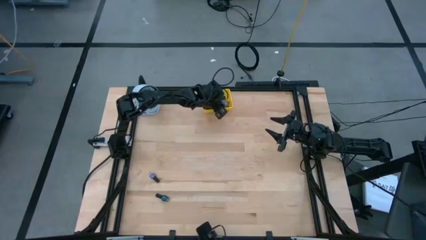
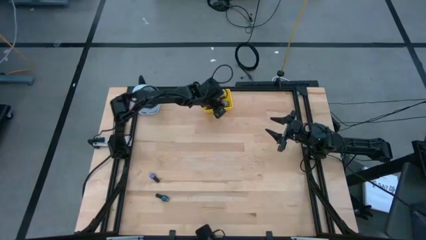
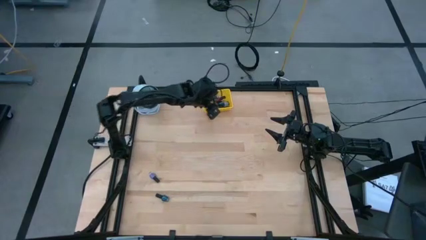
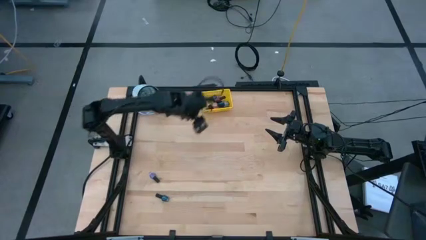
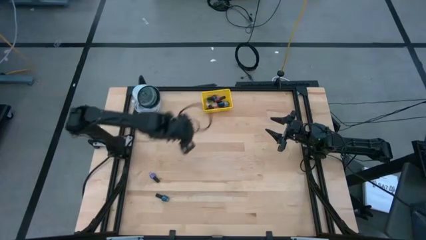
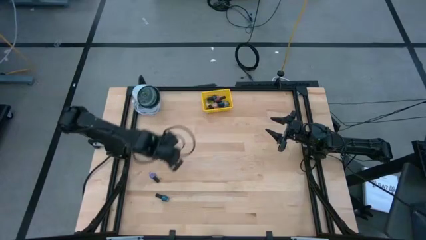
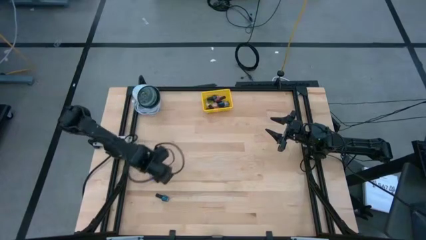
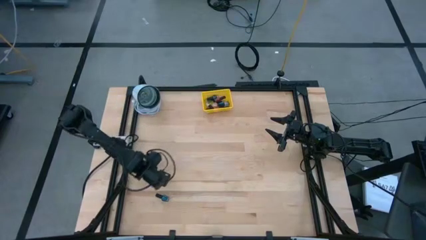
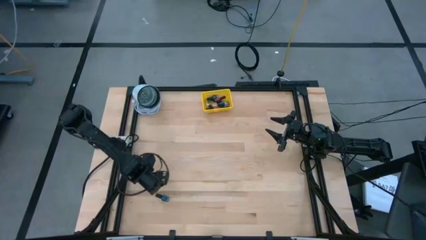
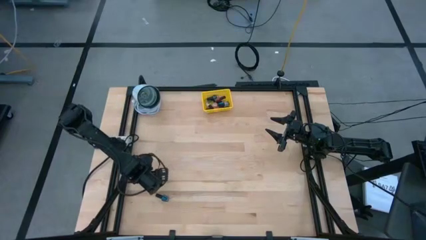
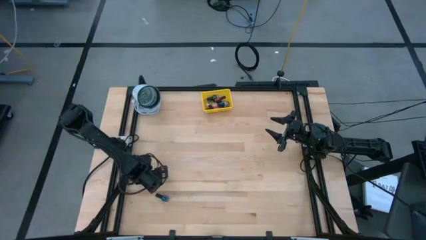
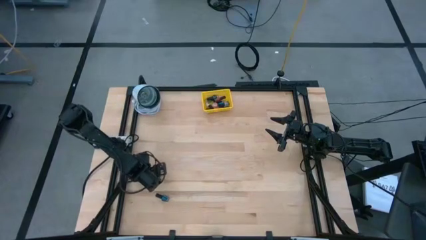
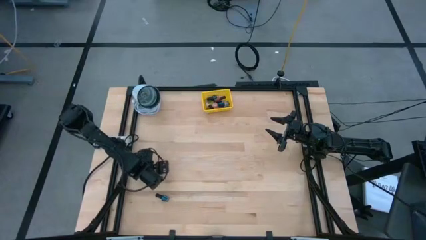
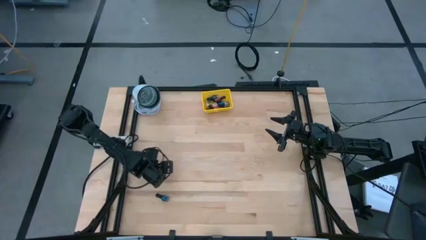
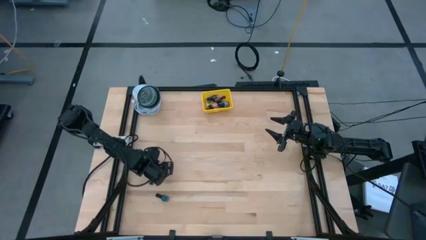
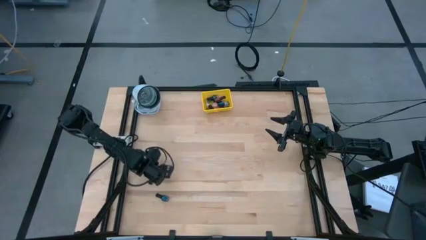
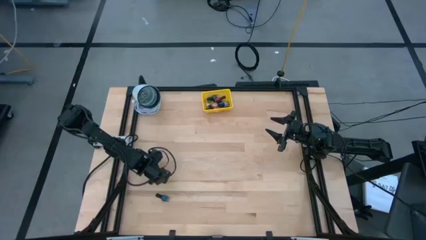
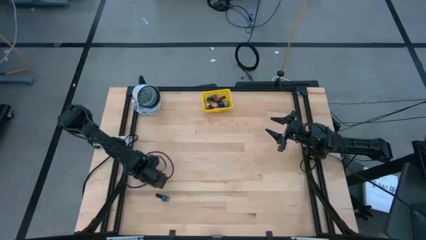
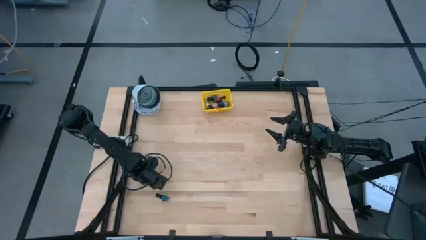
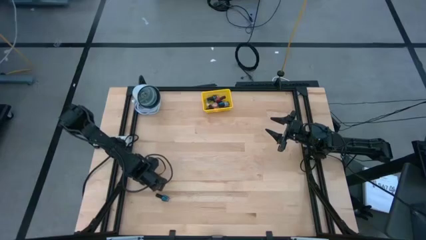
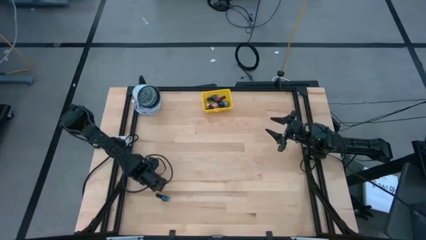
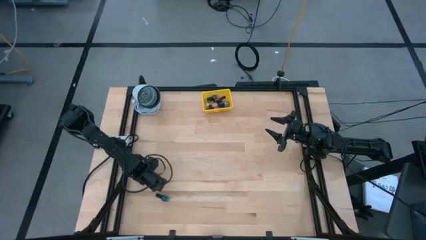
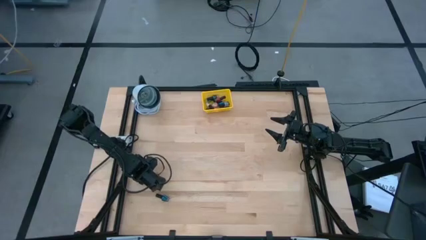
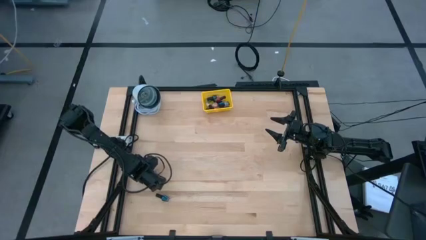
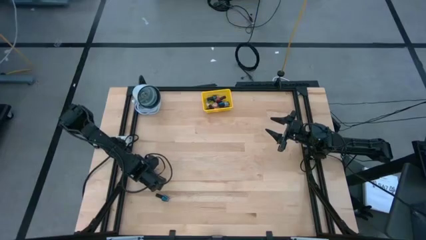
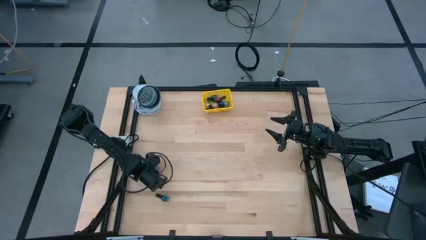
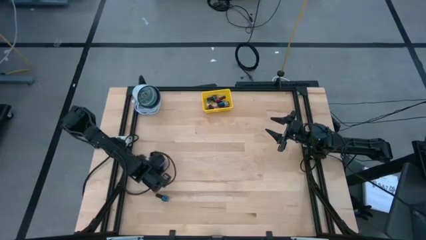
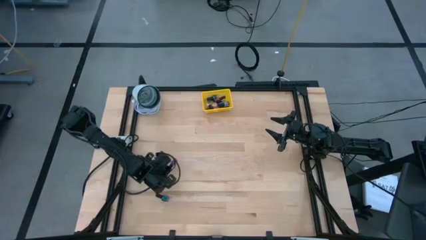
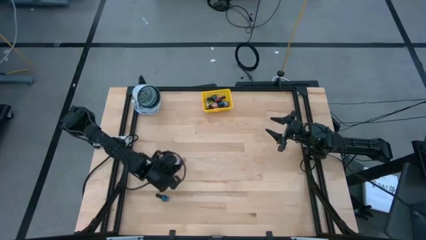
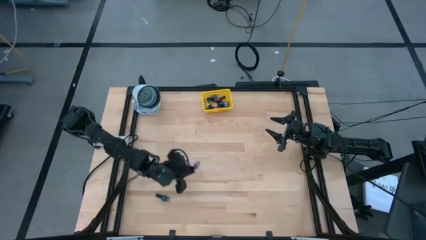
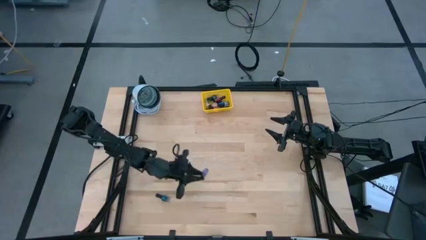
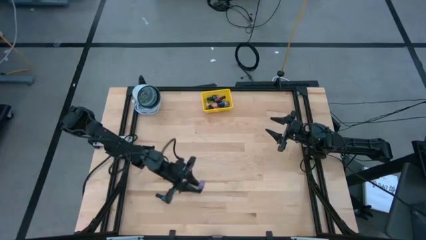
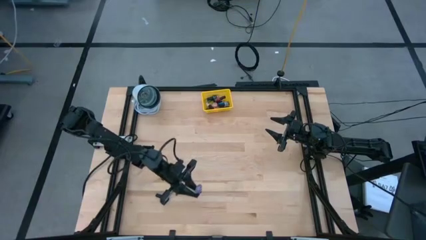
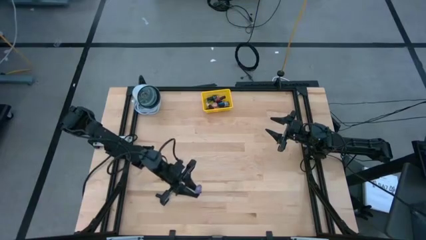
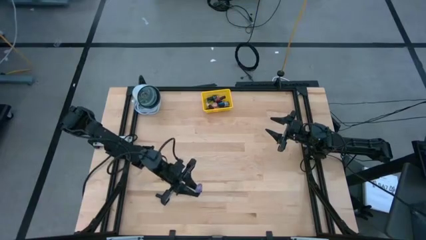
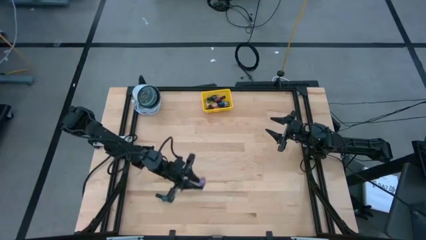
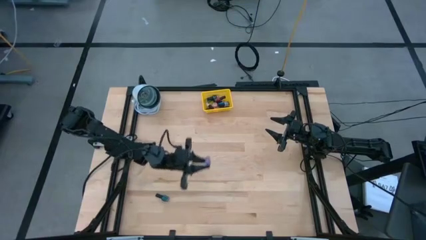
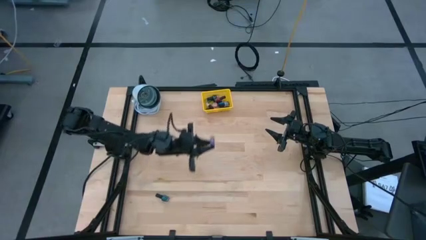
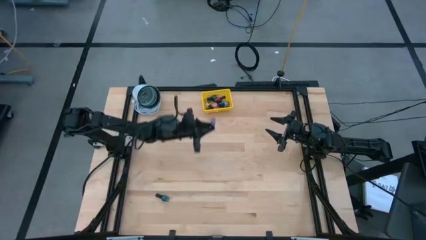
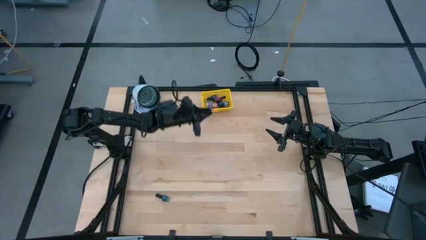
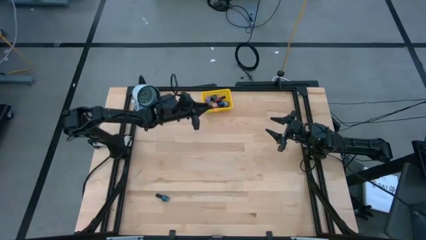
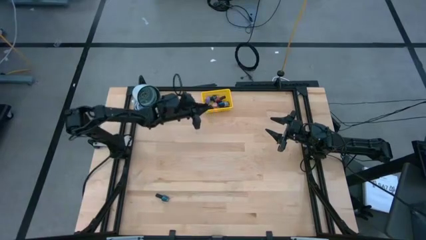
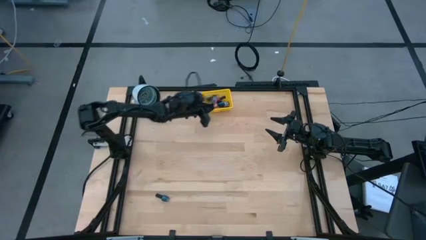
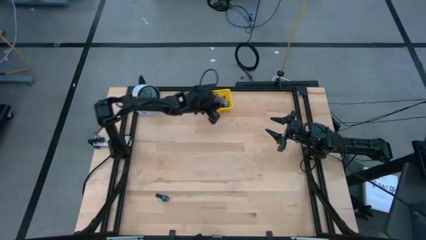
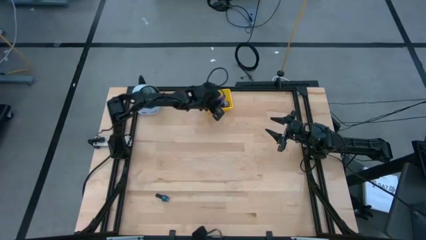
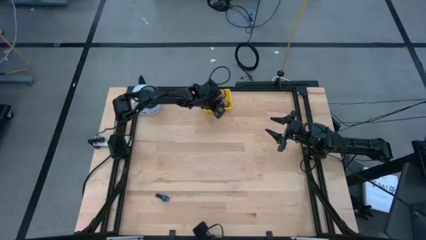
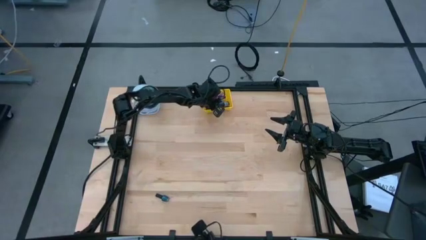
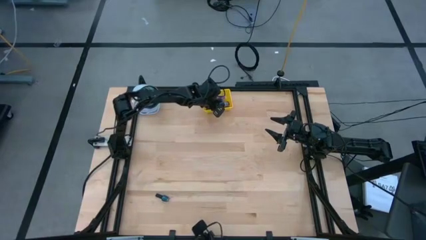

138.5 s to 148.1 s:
Task: Pick & Place Nail Polish
Put the purple nail polish bottle into the yellow bin

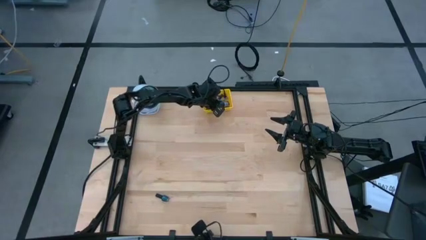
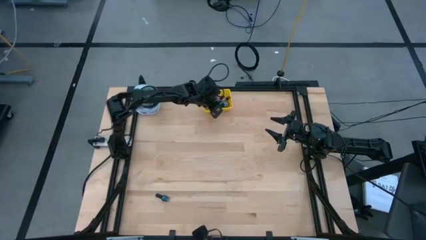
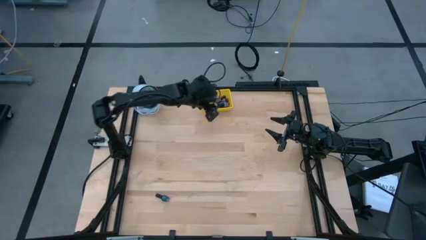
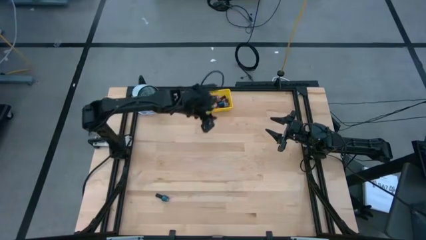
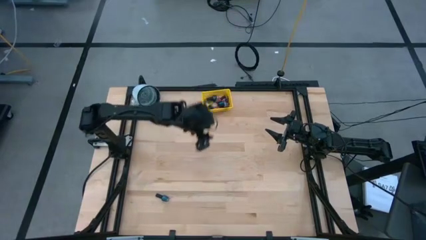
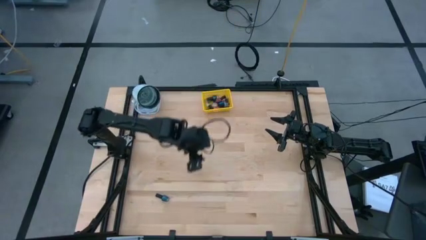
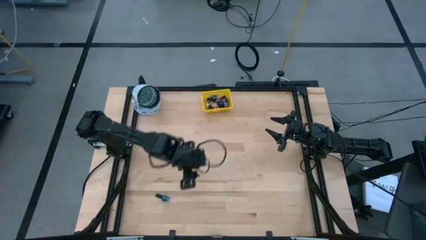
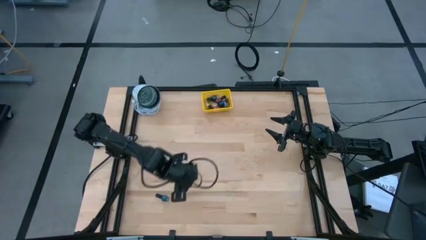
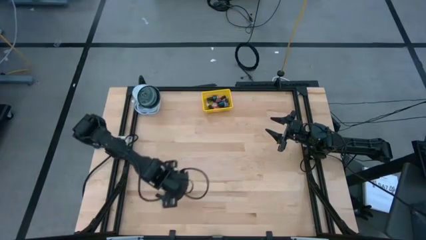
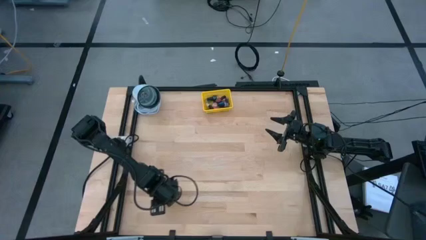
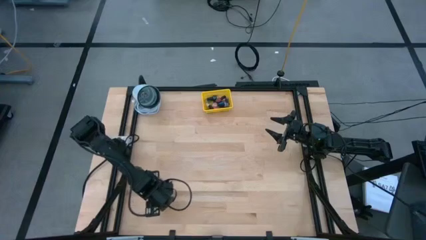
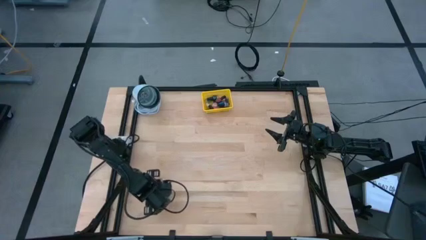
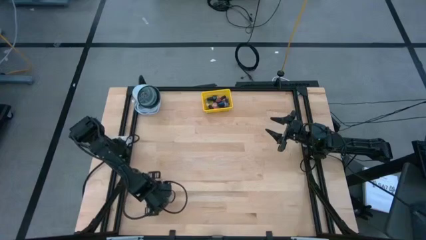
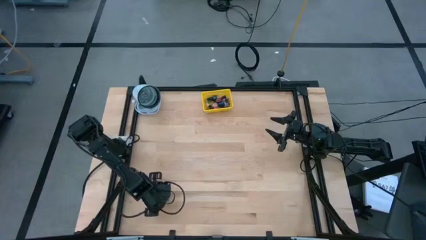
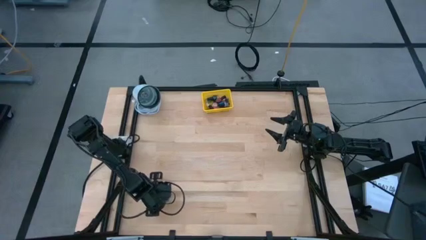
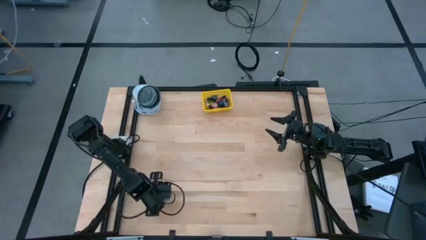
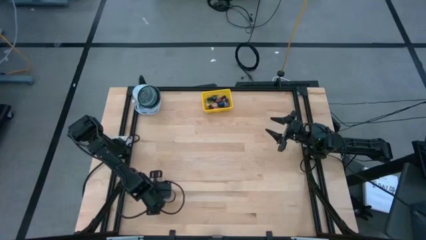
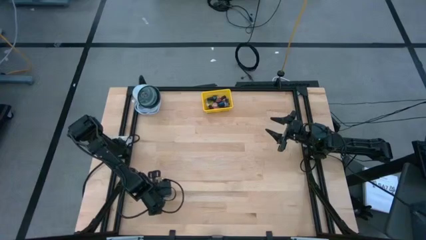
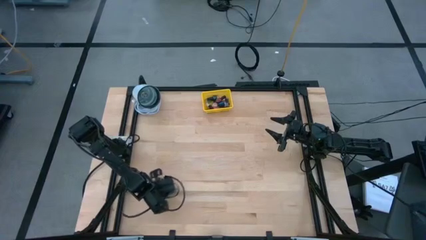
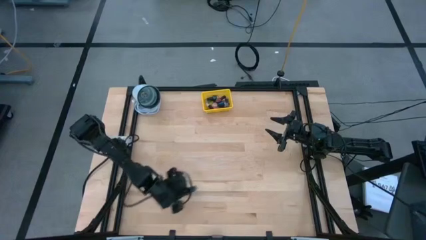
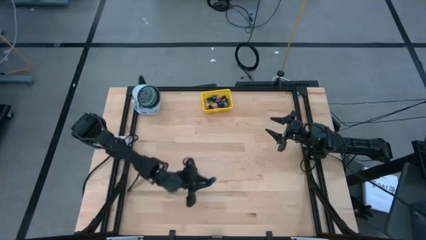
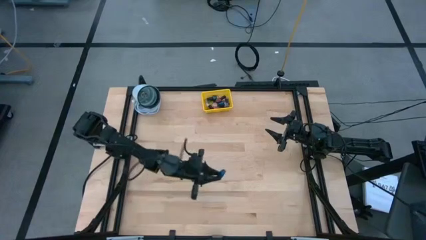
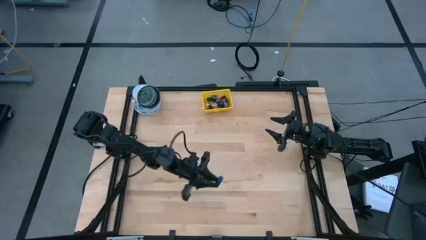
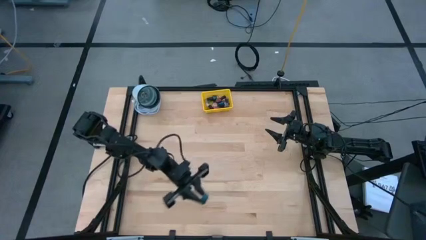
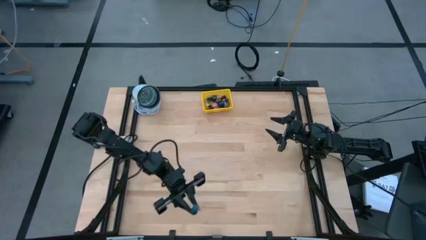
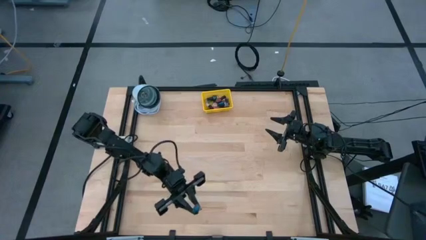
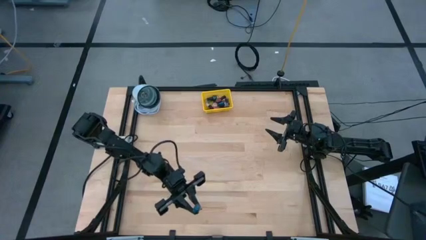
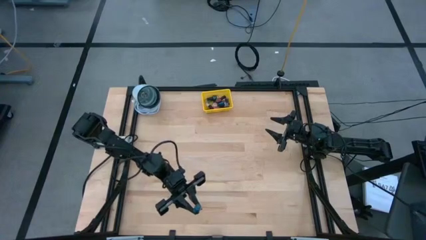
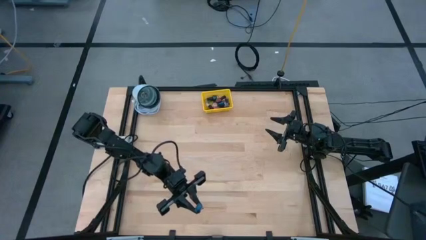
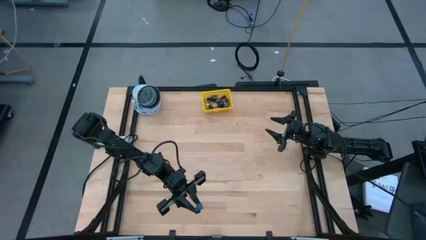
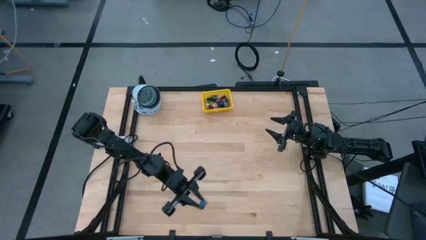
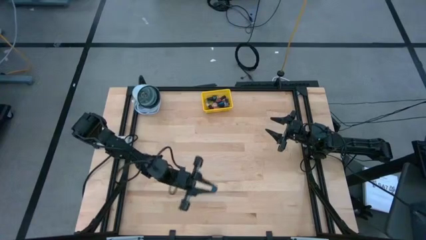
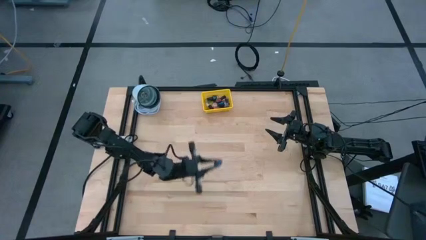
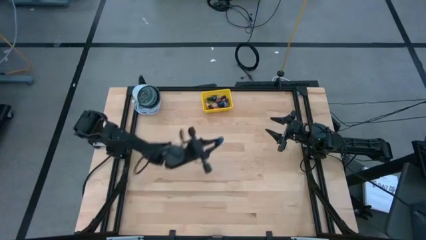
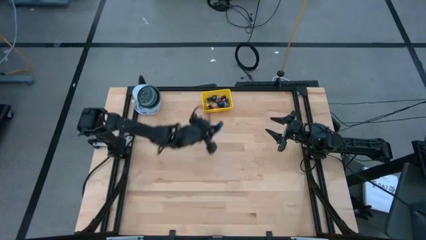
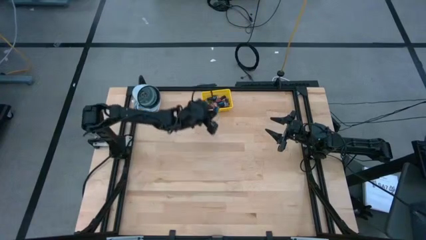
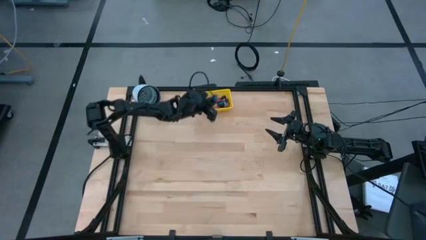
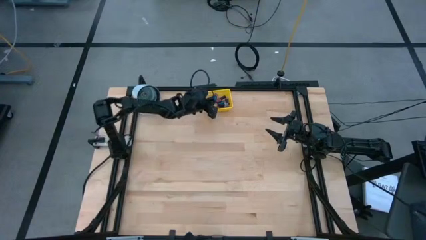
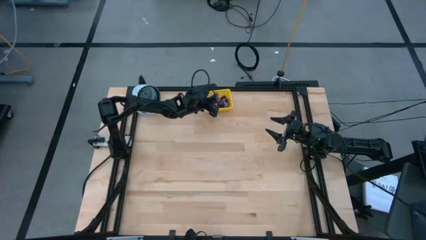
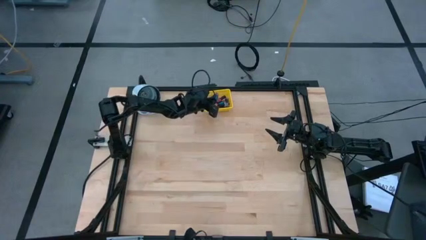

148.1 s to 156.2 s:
Put the dark blue nail polish bottle into the yellow bin
